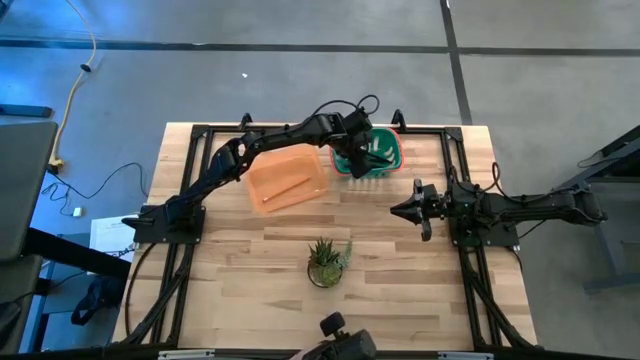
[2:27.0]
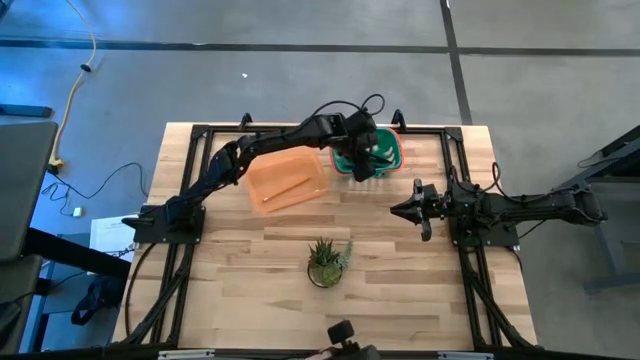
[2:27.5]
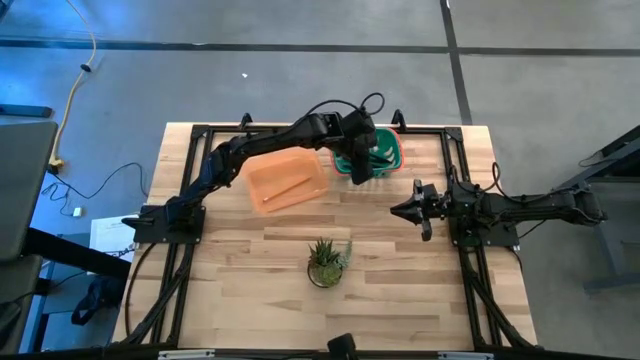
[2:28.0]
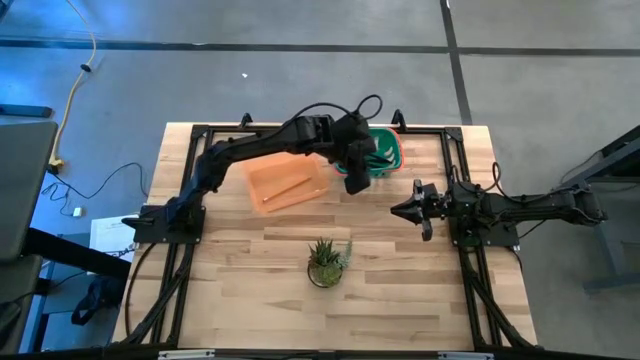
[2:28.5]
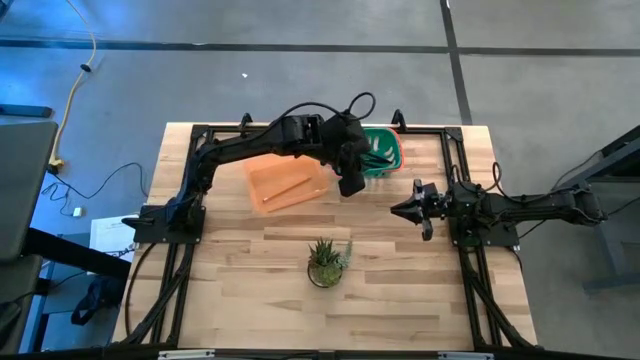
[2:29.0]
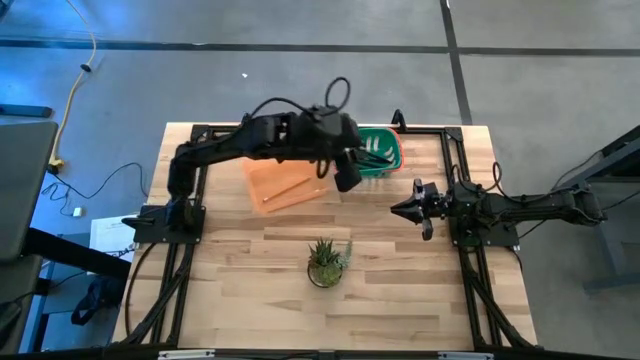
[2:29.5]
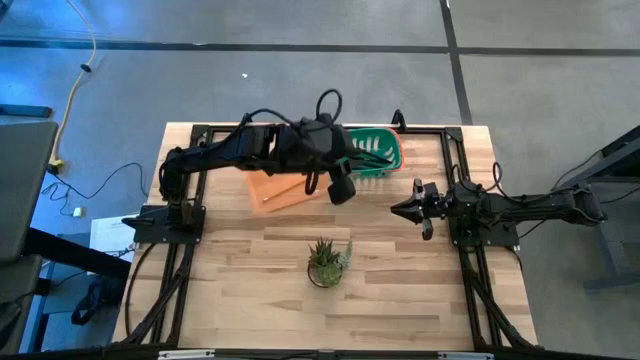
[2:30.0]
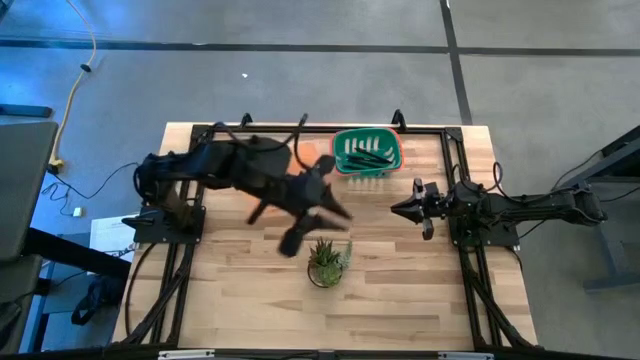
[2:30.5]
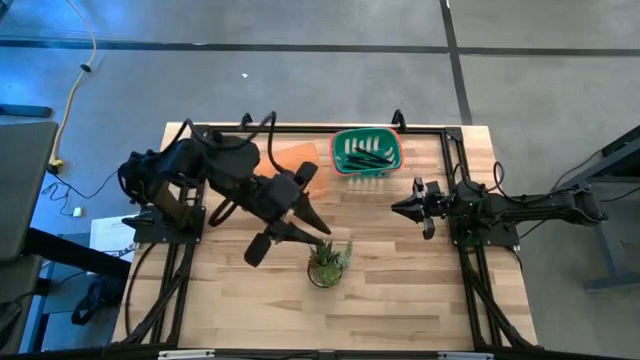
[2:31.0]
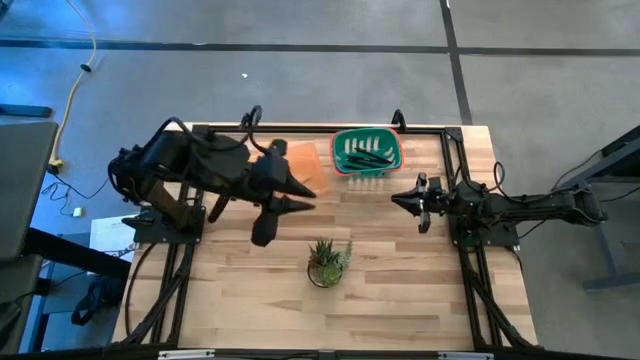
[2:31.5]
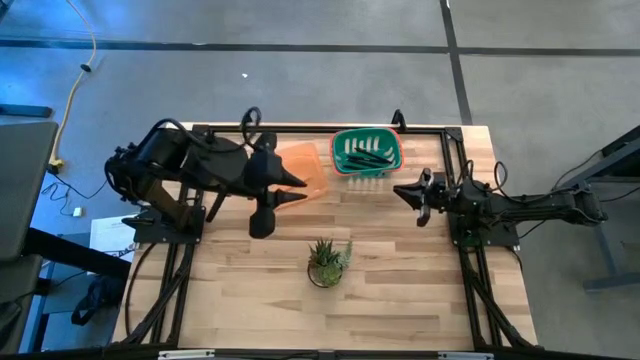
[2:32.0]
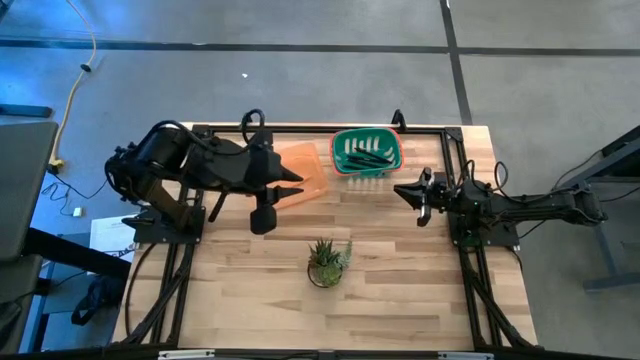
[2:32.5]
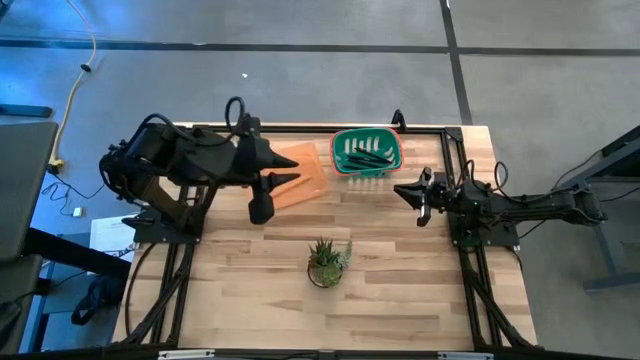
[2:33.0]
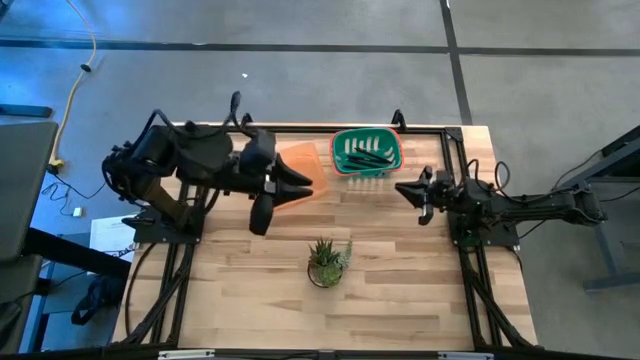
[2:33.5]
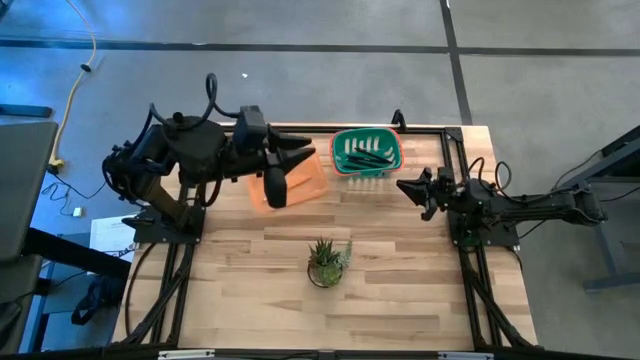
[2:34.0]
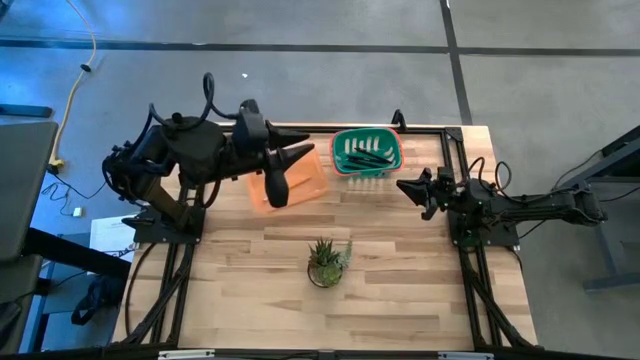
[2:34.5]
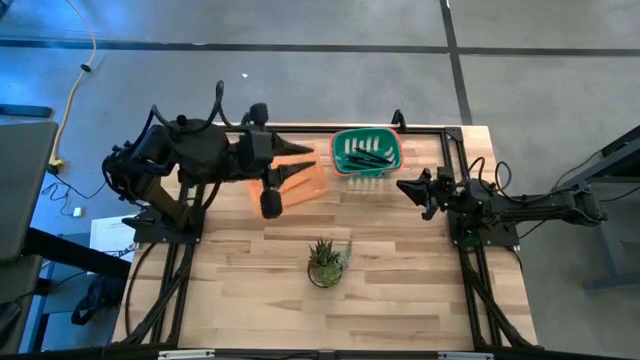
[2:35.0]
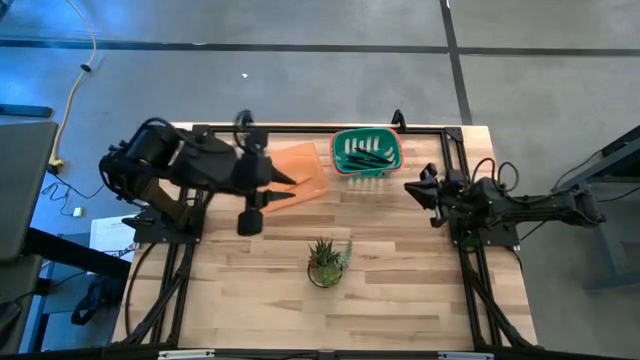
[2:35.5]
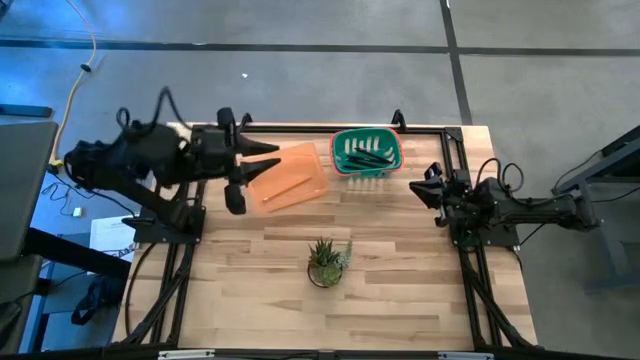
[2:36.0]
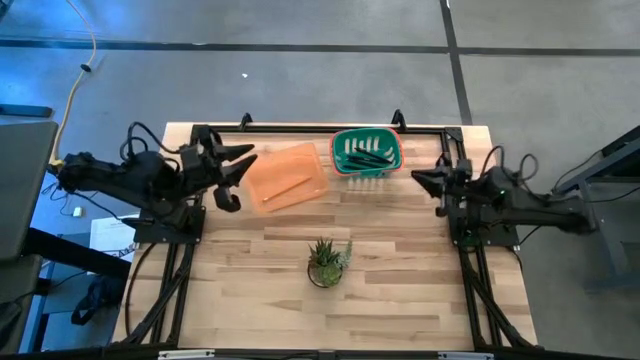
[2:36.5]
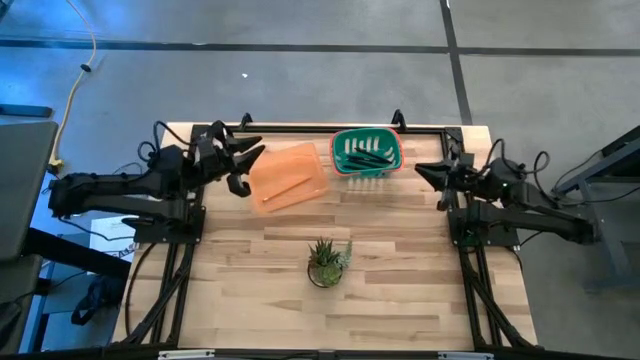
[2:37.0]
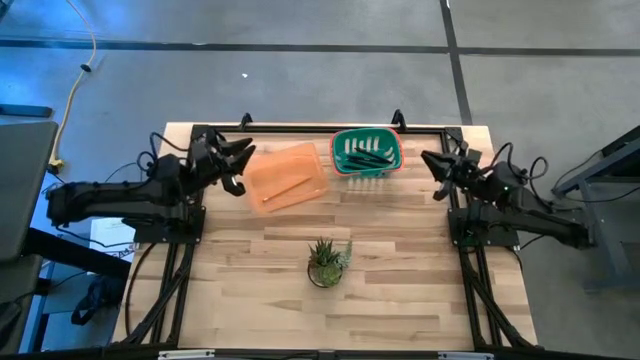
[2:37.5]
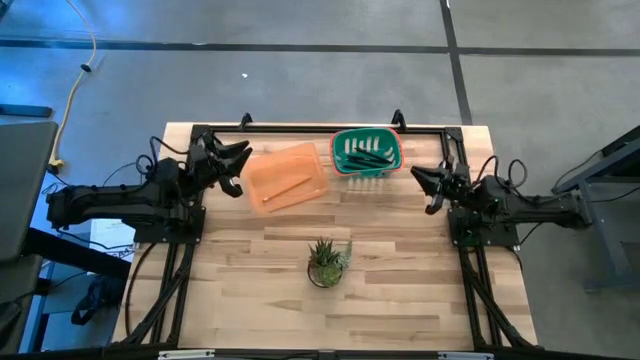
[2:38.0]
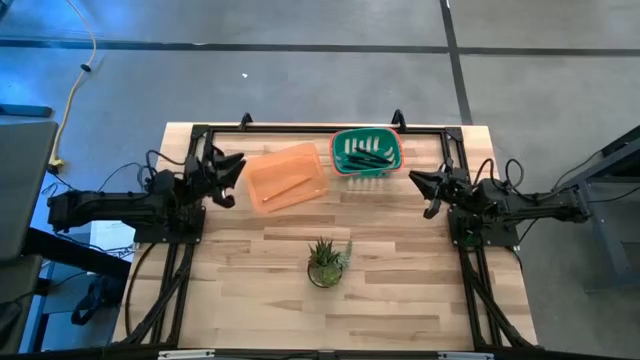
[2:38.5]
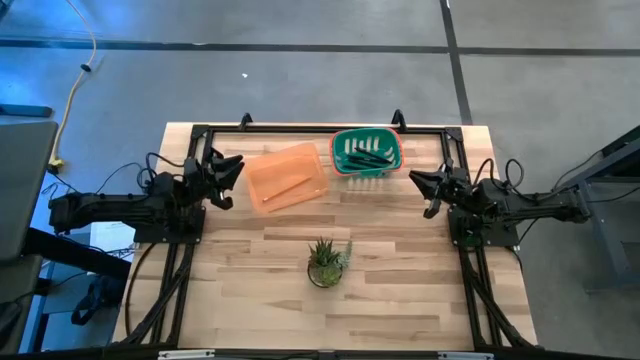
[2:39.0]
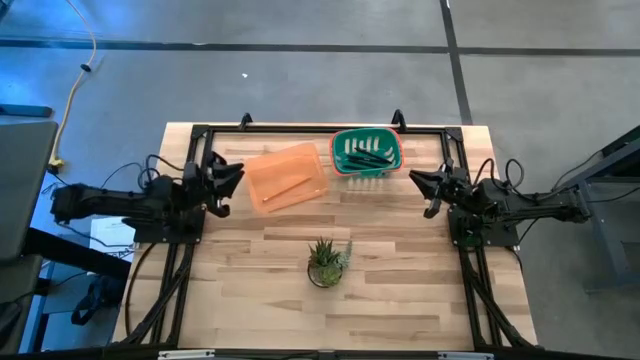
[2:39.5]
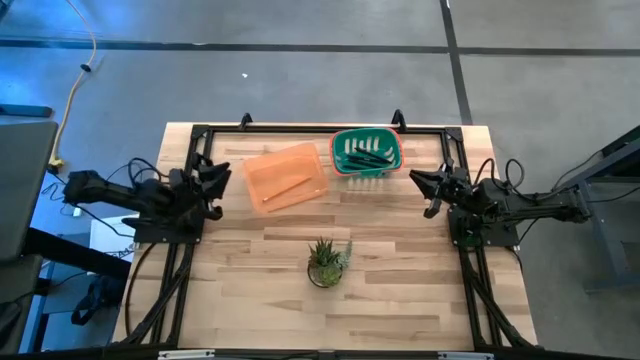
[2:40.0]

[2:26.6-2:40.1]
Task: Sort pens & pencils
Return to Home Position

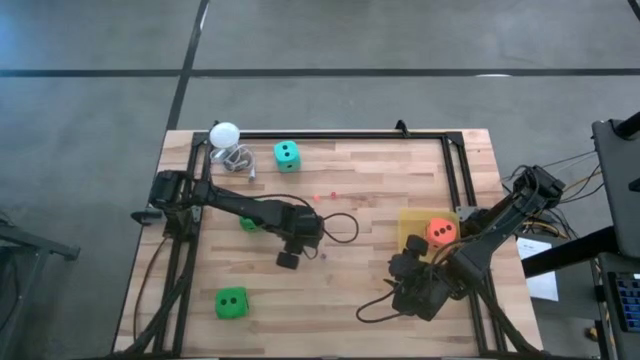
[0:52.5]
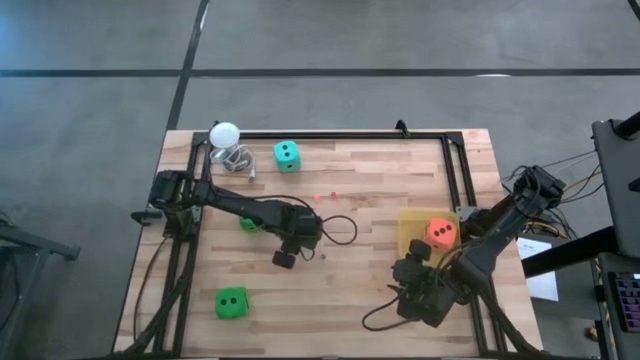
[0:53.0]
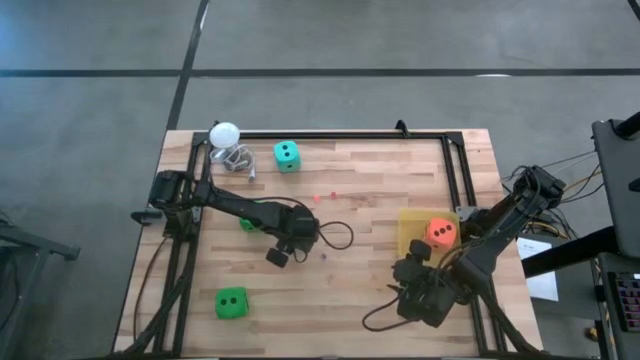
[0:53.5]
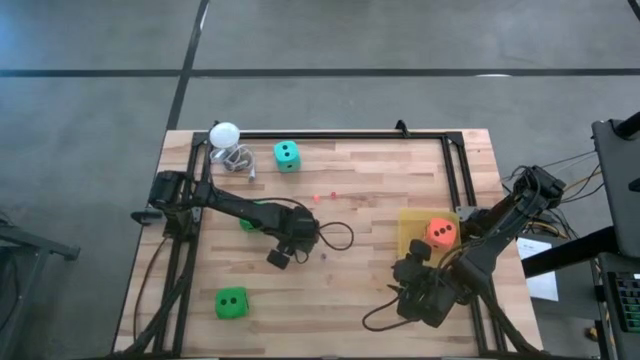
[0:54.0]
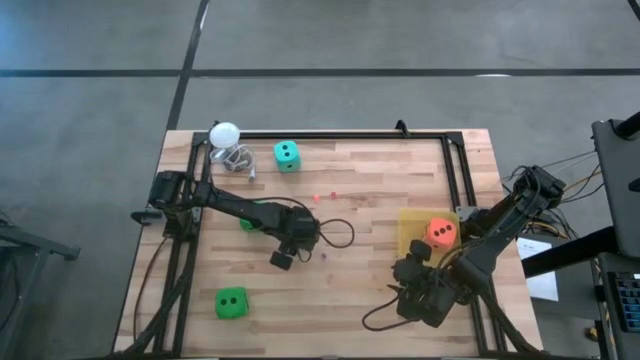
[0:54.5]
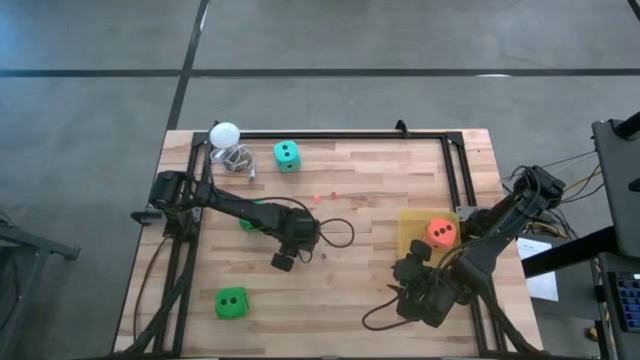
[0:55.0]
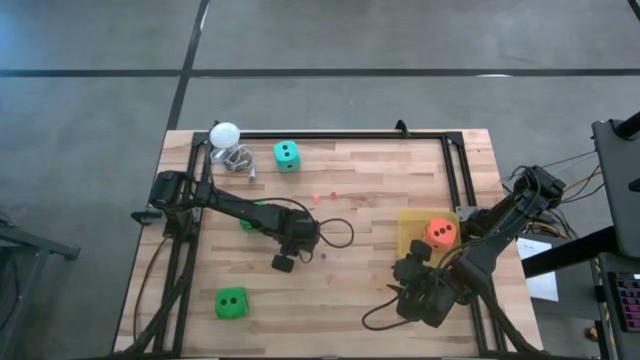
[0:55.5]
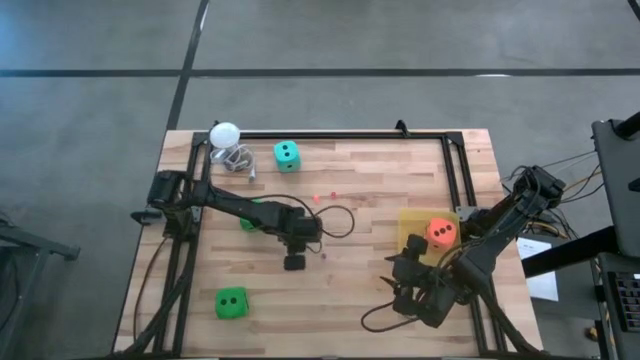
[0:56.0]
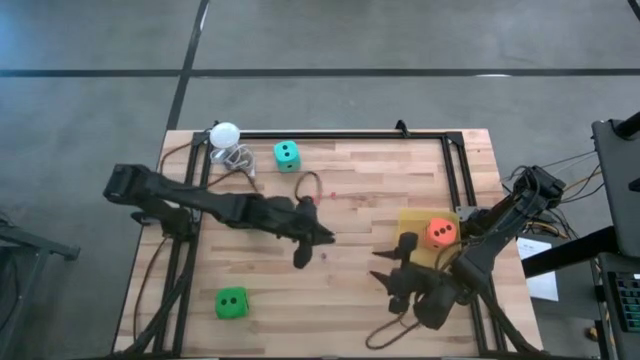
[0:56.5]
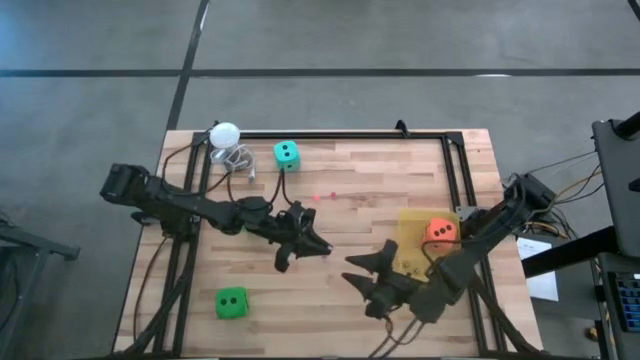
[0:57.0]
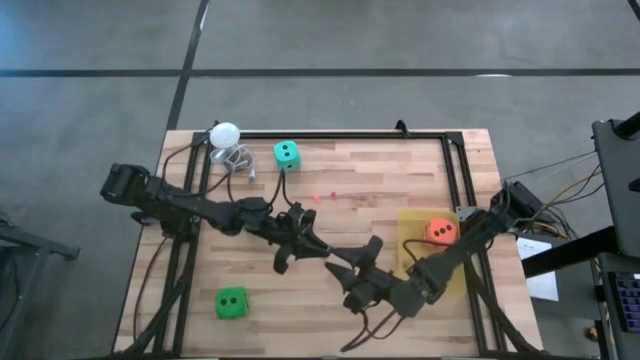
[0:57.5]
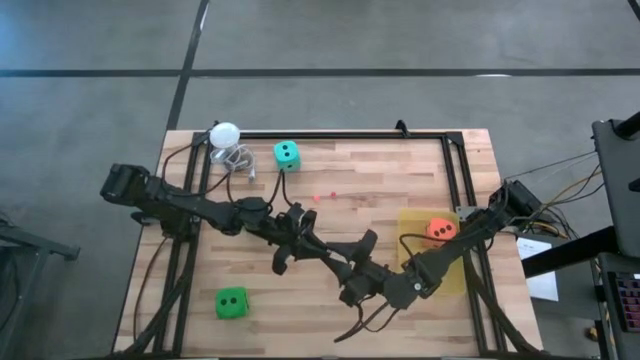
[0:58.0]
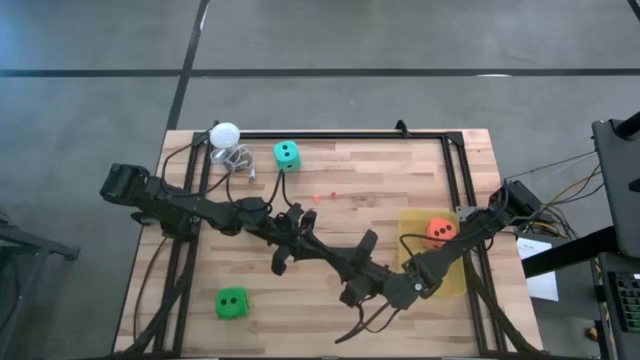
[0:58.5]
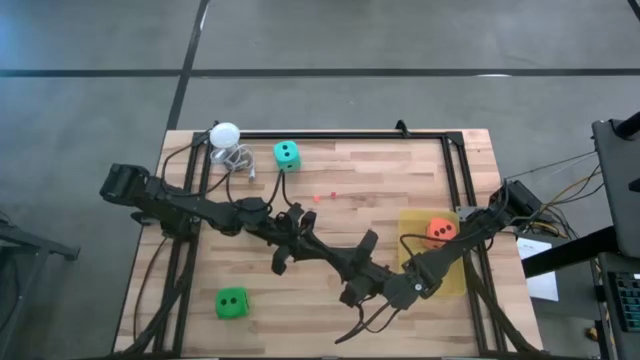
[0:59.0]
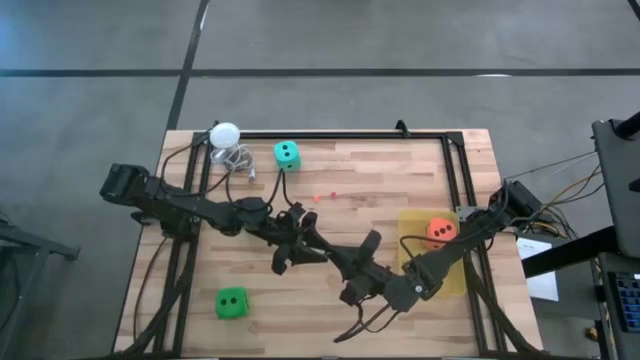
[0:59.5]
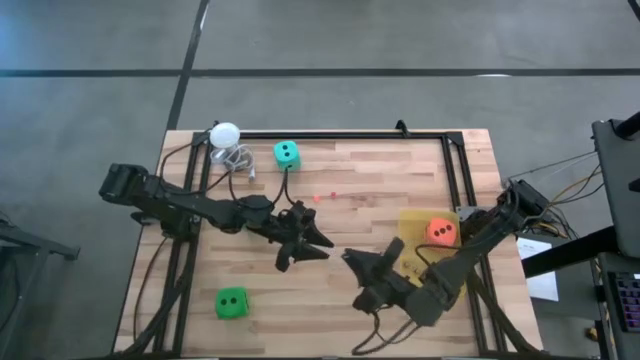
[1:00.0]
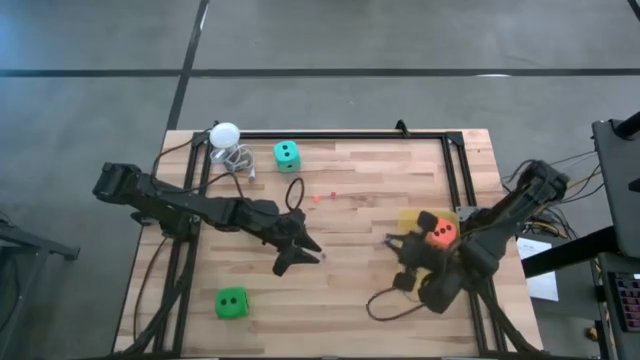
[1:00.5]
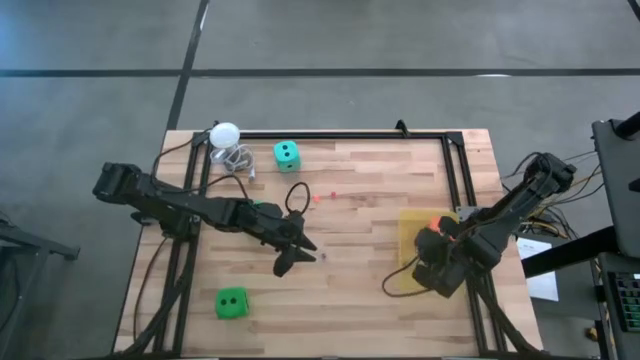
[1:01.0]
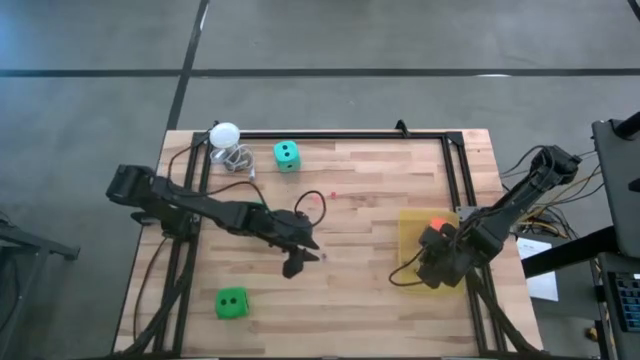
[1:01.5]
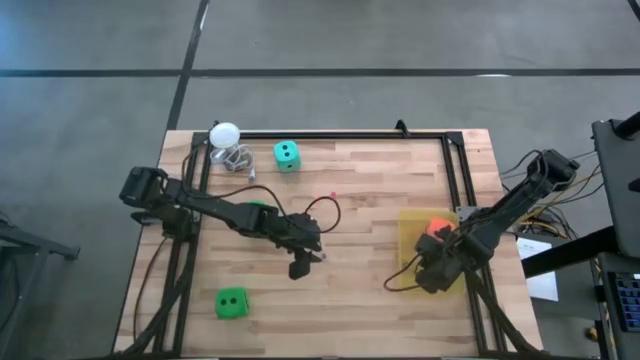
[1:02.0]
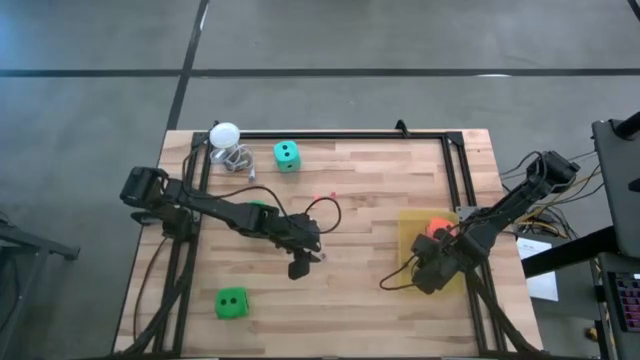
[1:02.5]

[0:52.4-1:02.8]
Task: Pick & Place Dice
Put the small blue dice into the yellow bin
